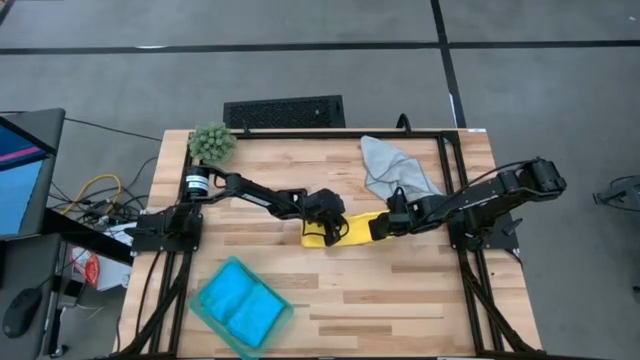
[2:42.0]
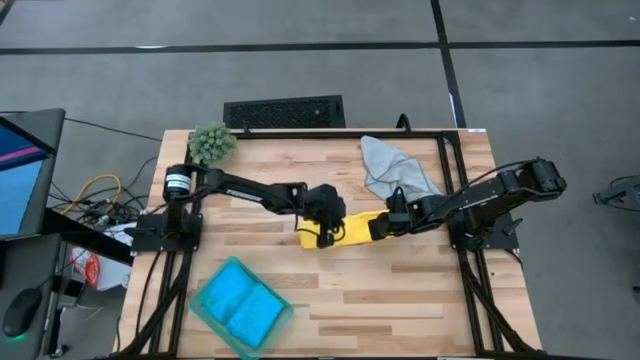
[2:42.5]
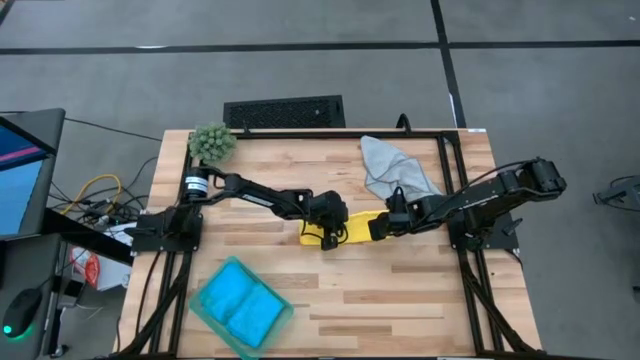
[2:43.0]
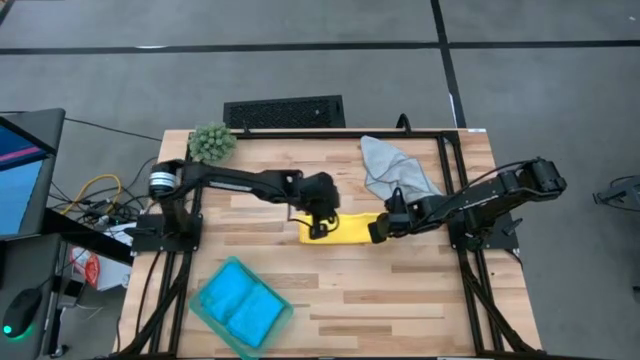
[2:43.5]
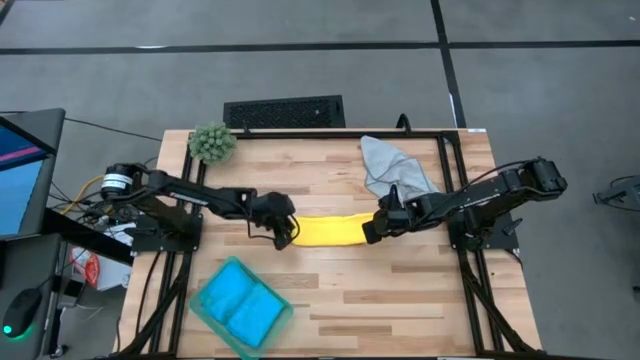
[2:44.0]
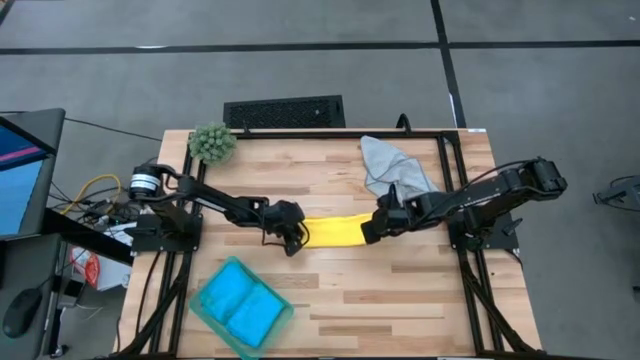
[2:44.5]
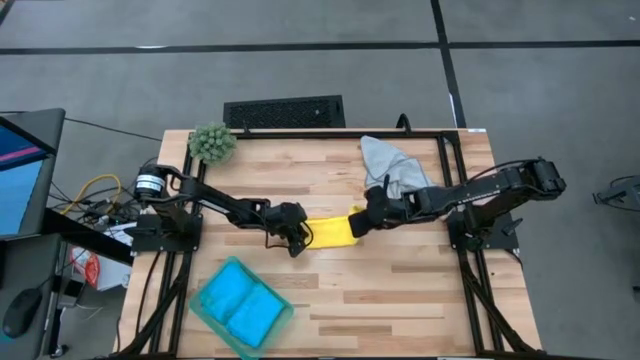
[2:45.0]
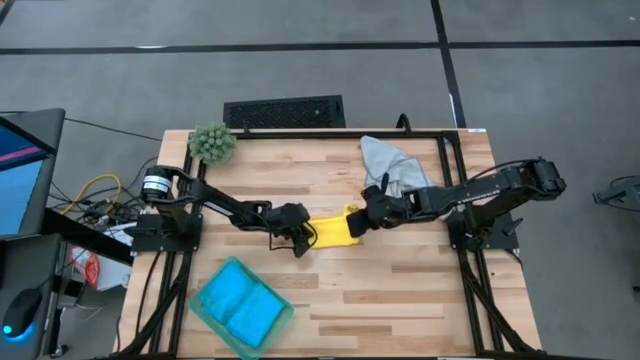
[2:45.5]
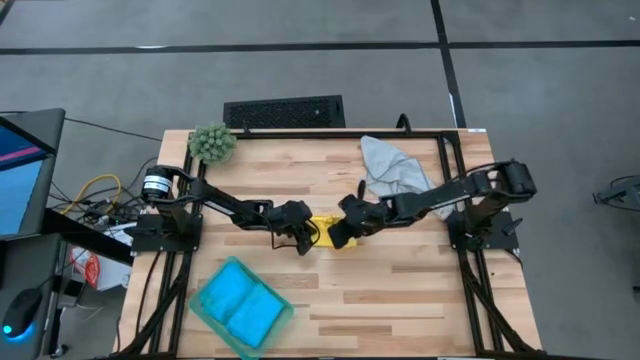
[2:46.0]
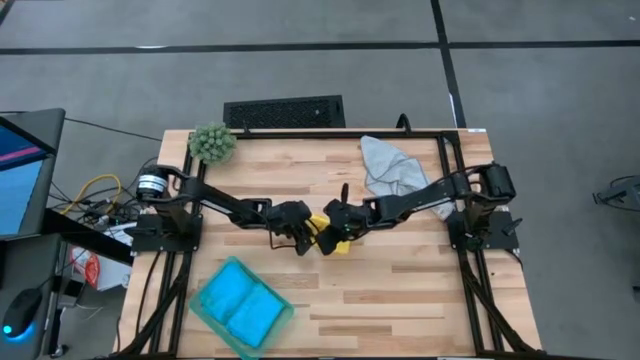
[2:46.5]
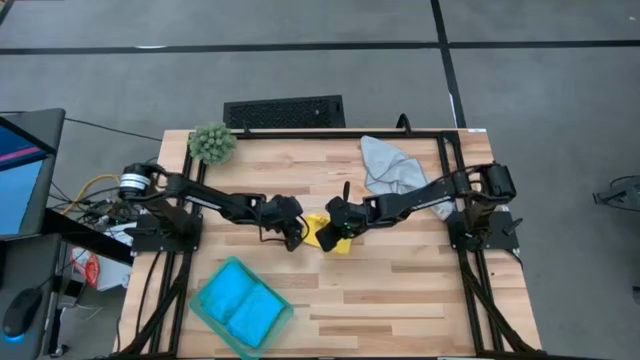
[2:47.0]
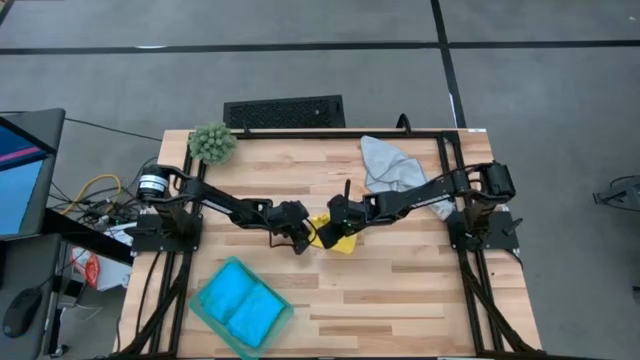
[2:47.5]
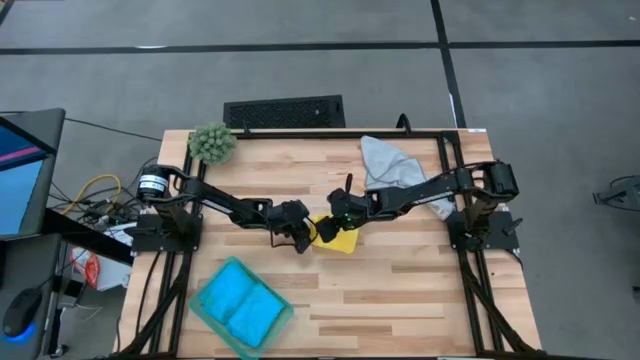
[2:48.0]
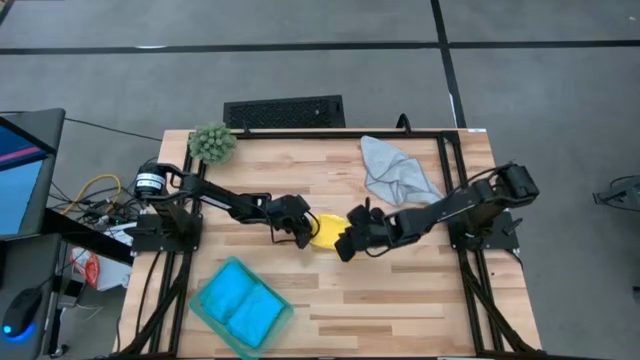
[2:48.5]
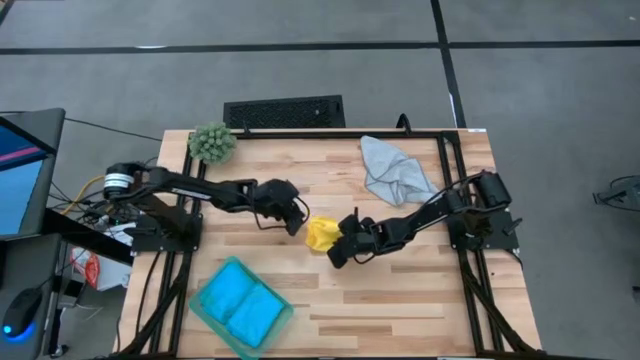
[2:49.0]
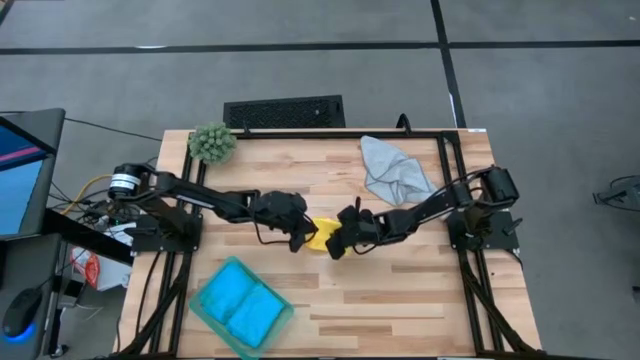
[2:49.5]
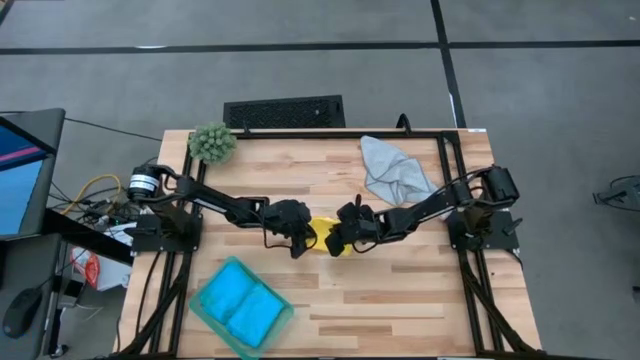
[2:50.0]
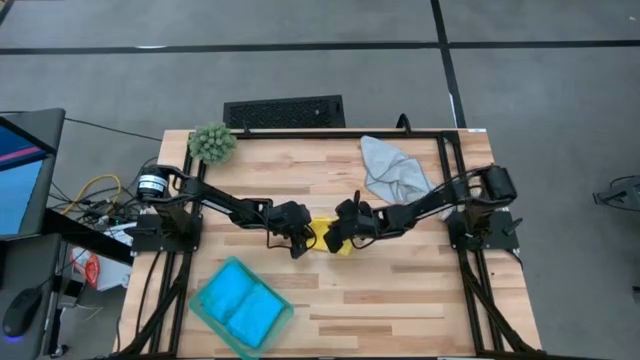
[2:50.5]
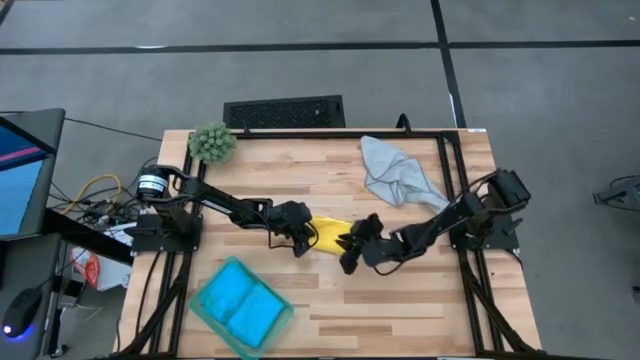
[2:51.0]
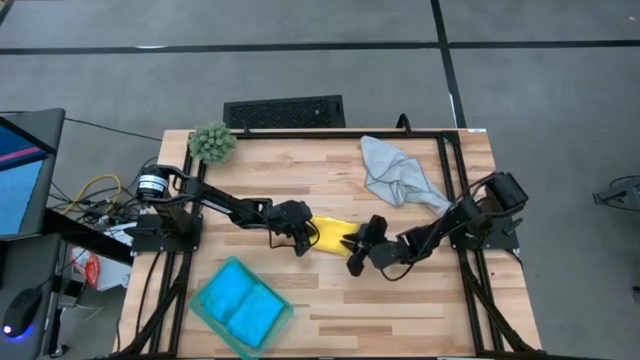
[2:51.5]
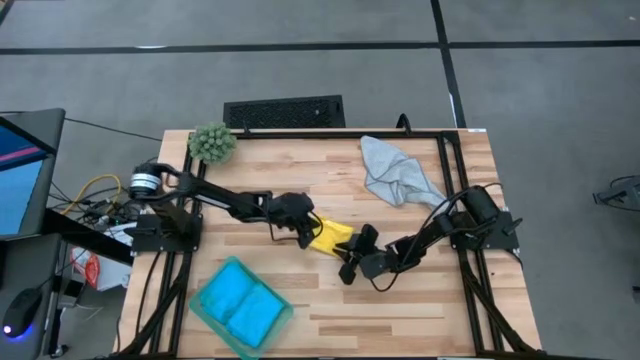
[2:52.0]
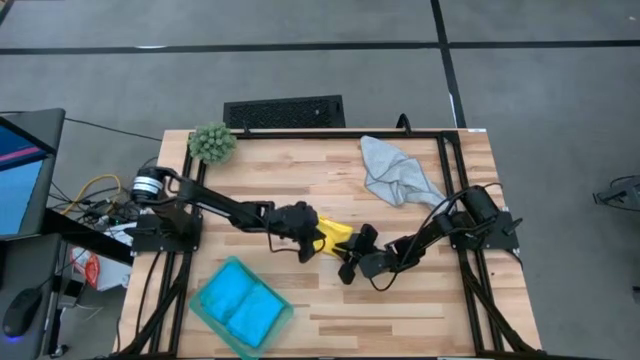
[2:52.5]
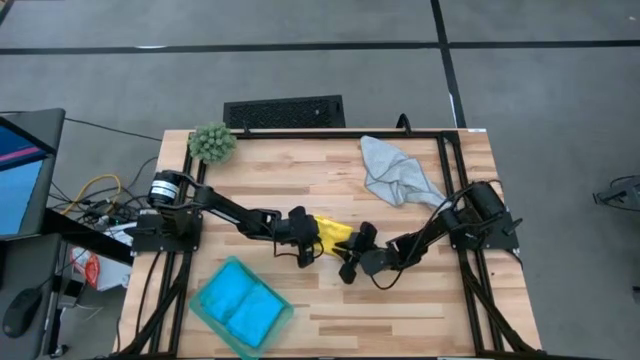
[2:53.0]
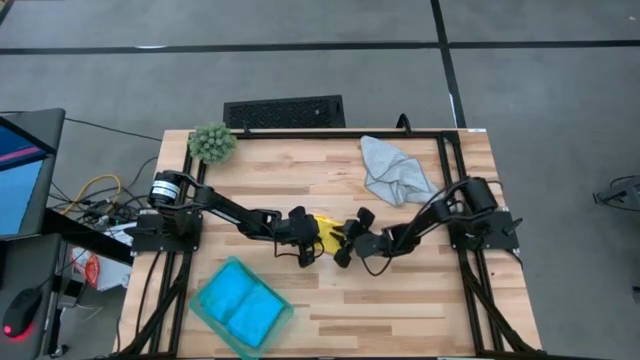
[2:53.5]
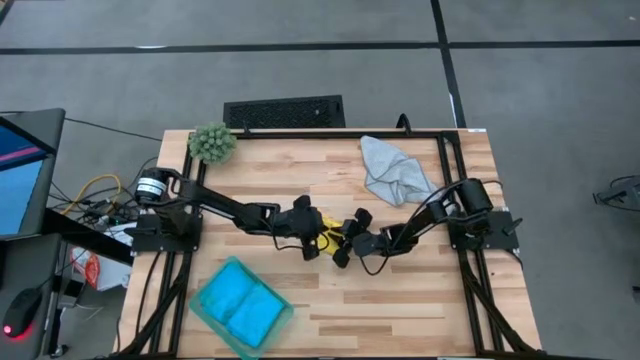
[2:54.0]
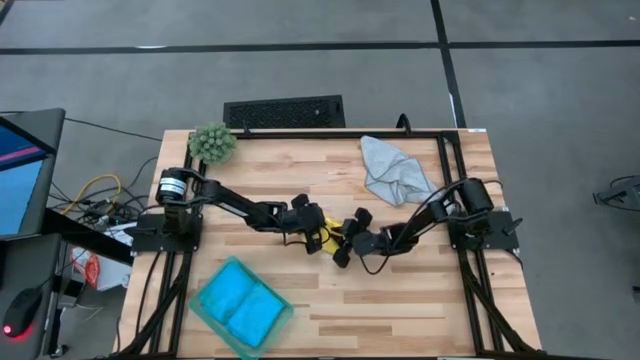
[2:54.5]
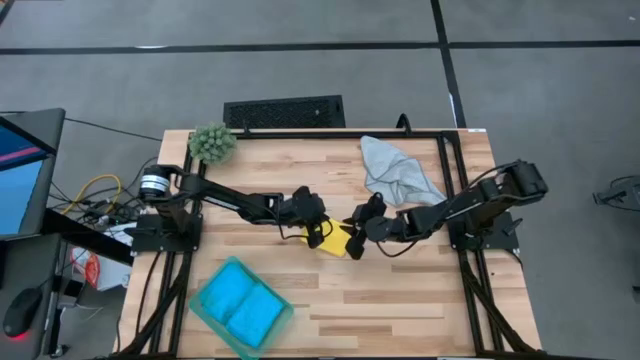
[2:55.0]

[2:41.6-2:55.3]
Task: Fold microfiber towels
Fold the yellow towel

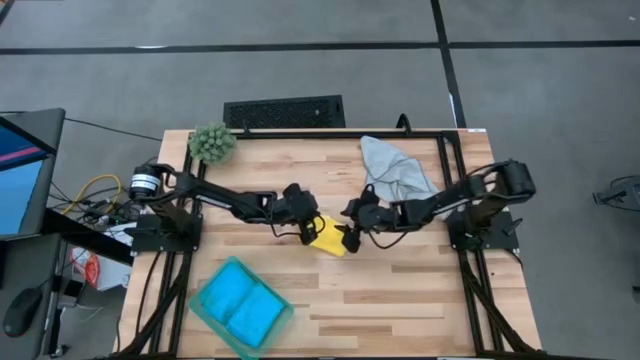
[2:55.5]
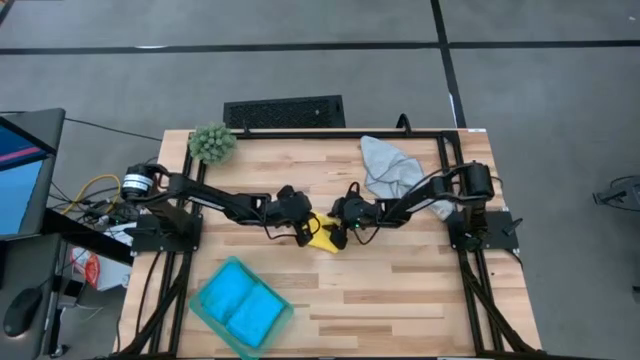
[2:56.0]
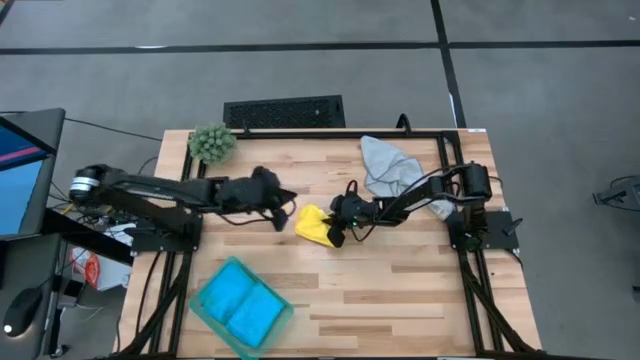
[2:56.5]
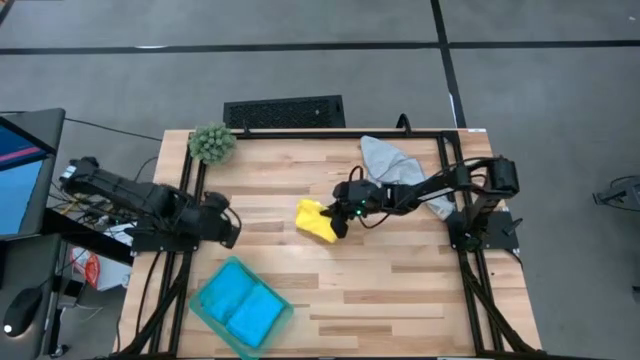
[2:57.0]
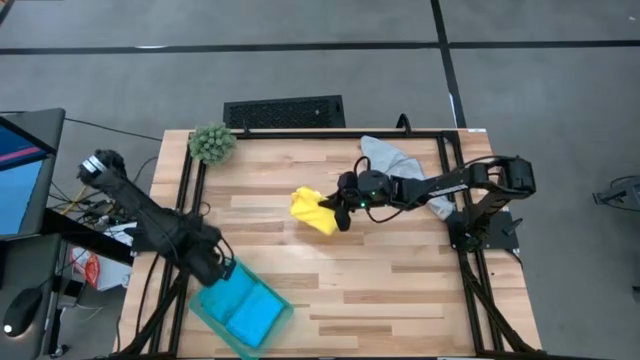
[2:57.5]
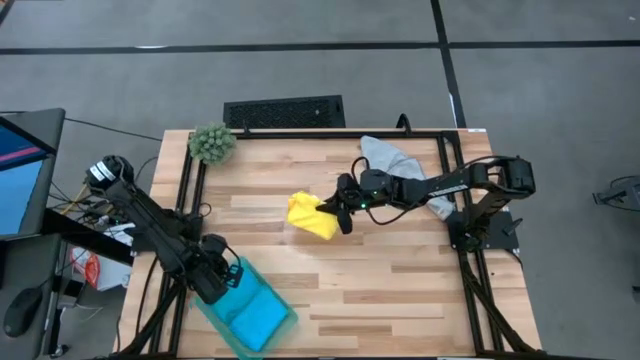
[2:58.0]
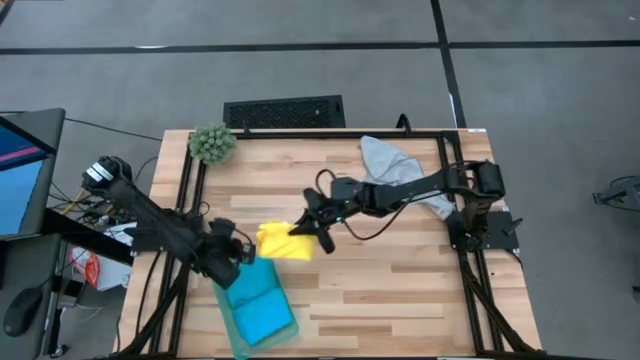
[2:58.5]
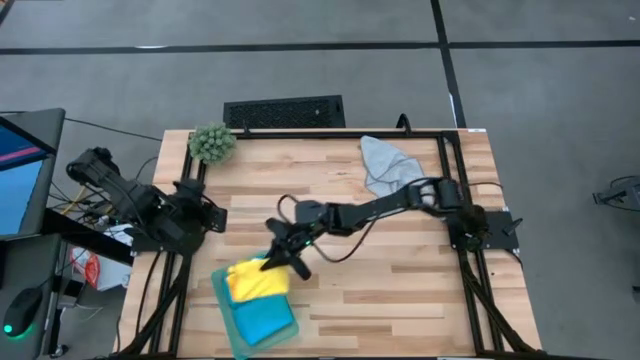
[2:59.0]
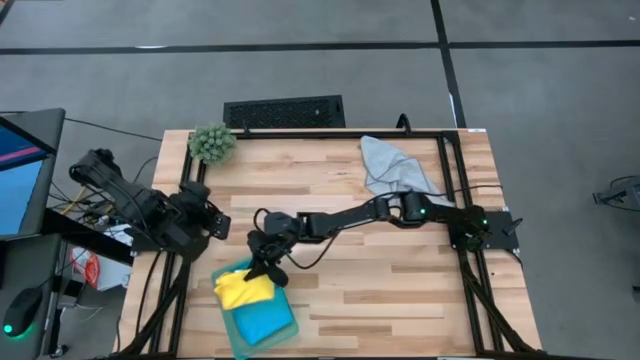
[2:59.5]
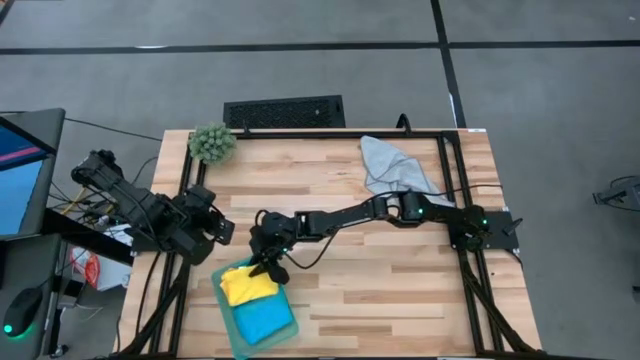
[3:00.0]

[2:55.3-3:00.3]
Put the folded yellow towel into the blue bin

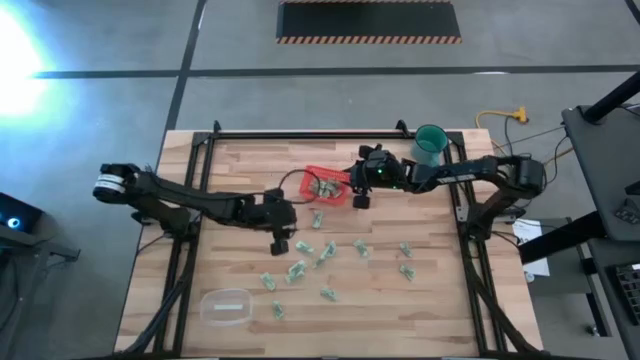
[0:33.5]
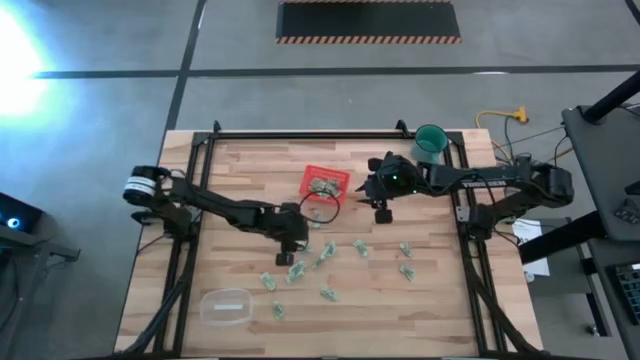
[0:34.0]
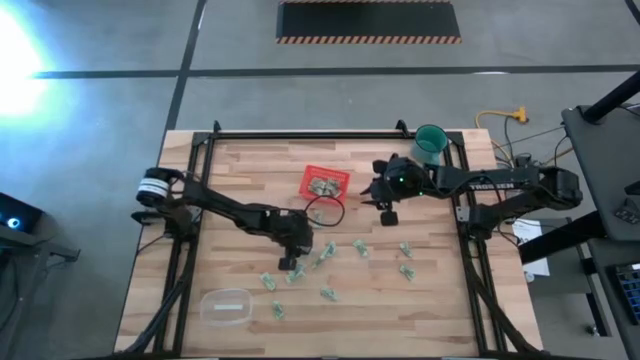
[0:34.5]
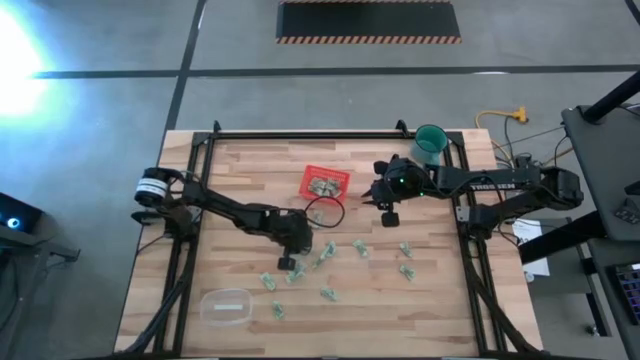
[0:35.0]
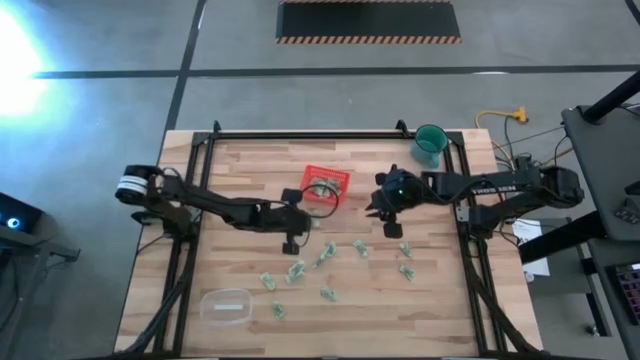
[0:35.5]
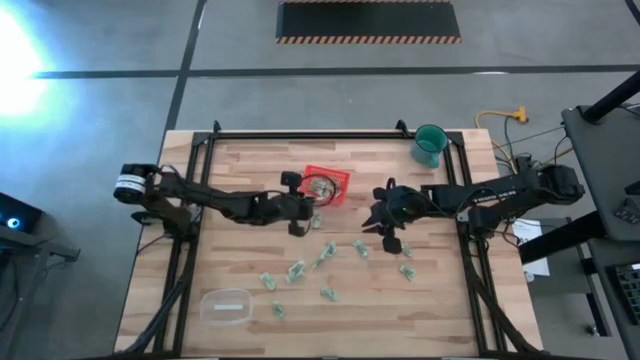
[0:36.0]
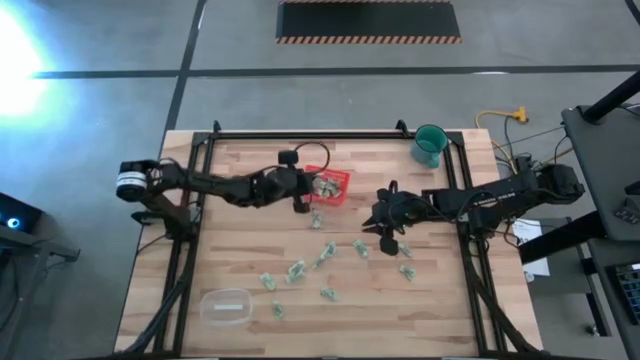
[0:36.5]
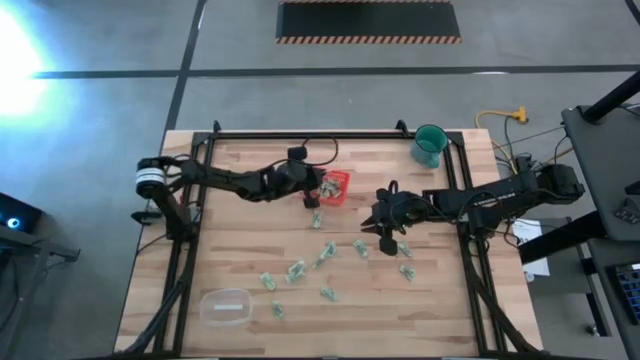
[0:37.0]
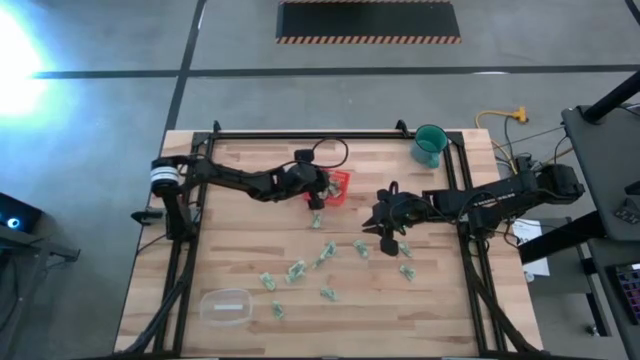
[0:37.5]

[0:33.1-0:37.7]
Task: Pick and place items into bin
Put the stevia packet into the orange bin
